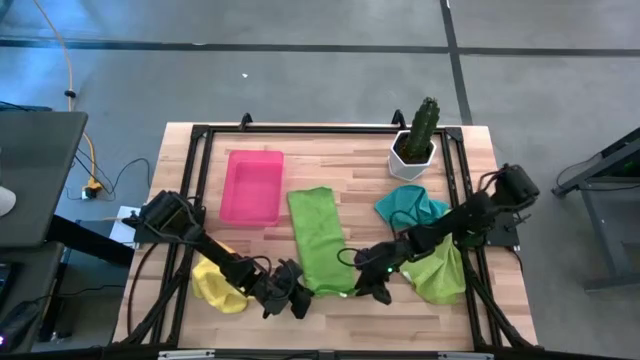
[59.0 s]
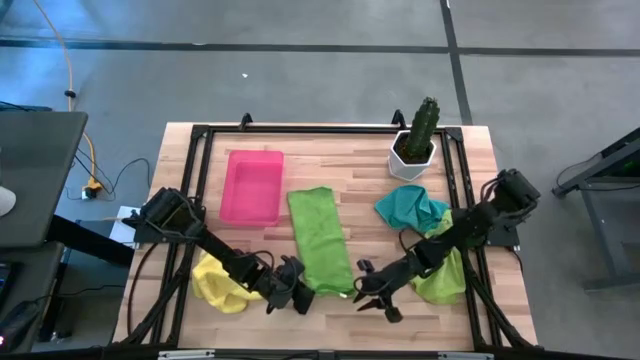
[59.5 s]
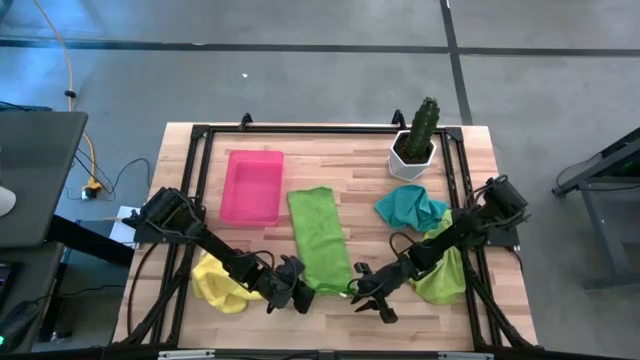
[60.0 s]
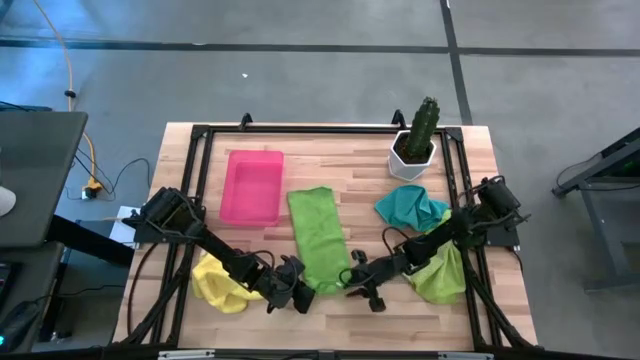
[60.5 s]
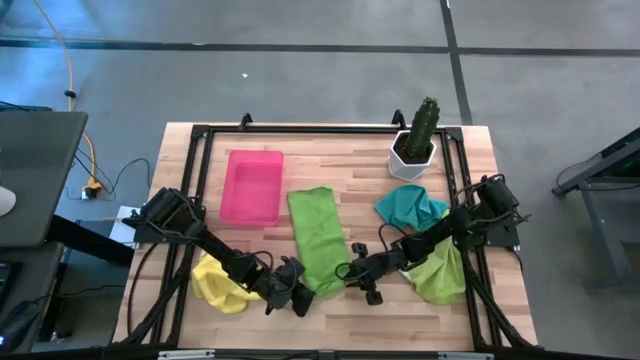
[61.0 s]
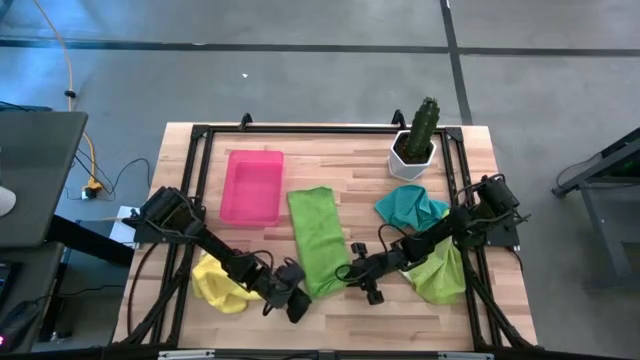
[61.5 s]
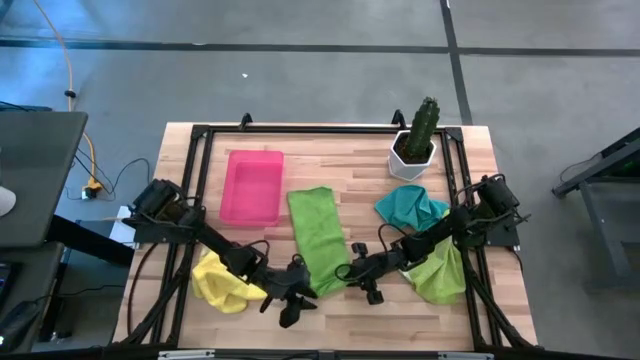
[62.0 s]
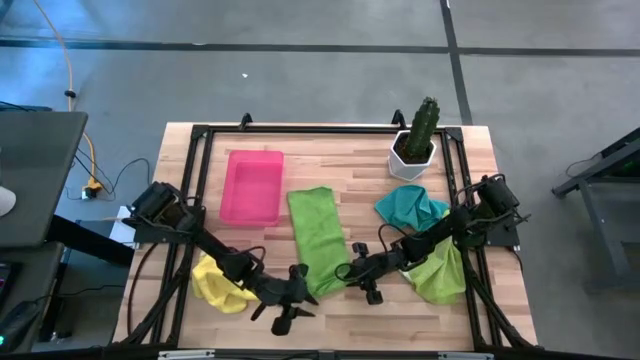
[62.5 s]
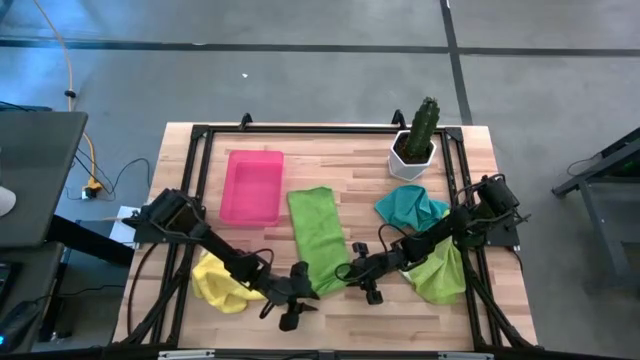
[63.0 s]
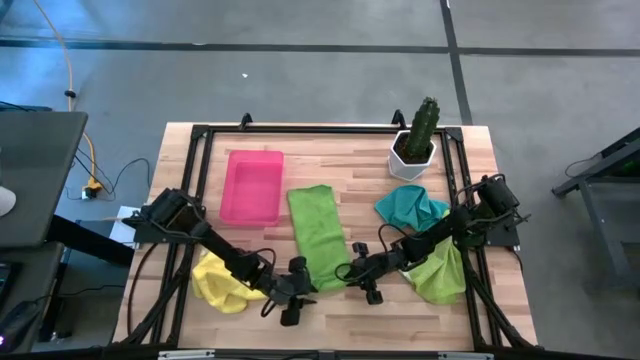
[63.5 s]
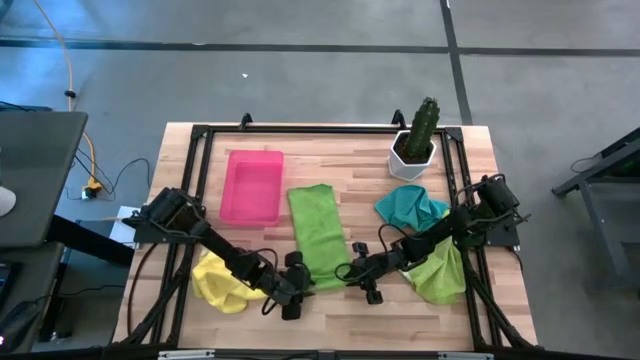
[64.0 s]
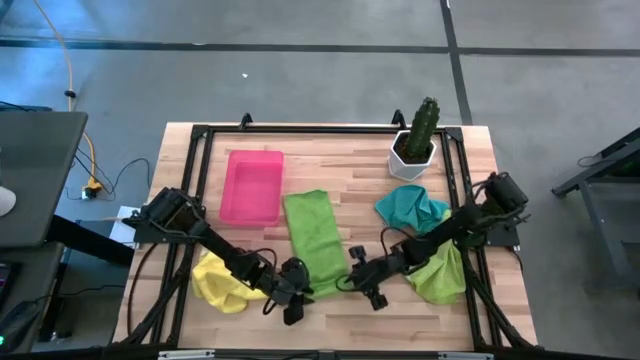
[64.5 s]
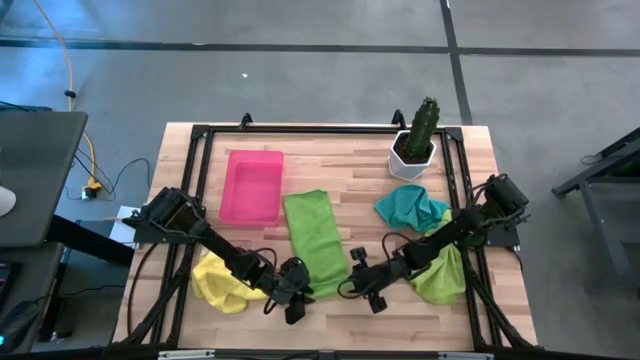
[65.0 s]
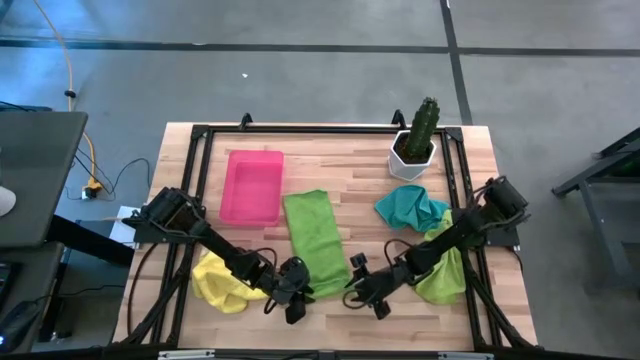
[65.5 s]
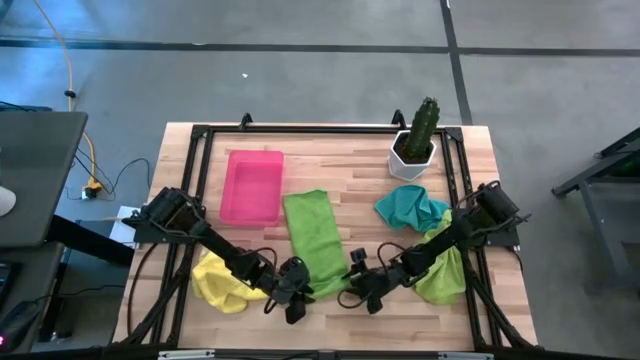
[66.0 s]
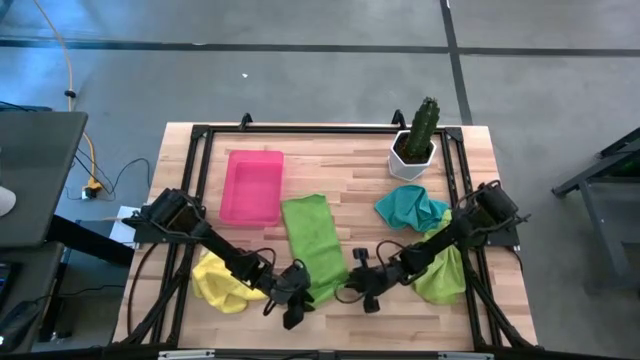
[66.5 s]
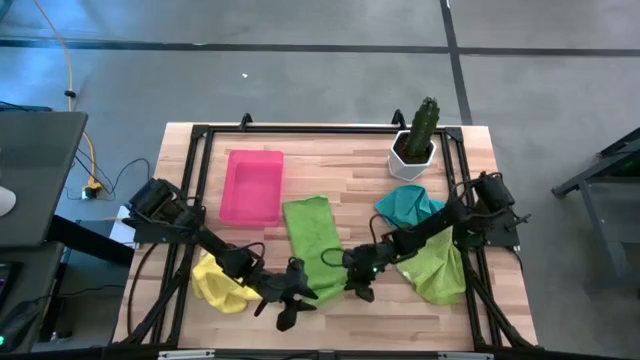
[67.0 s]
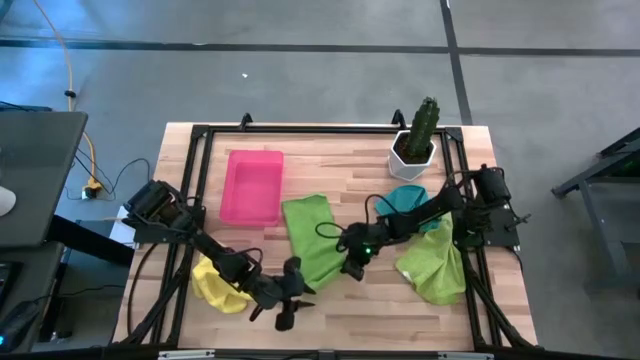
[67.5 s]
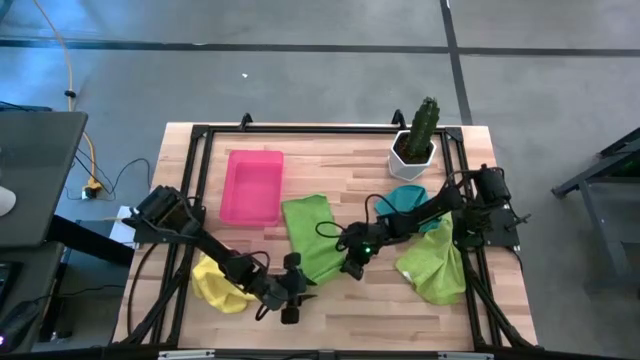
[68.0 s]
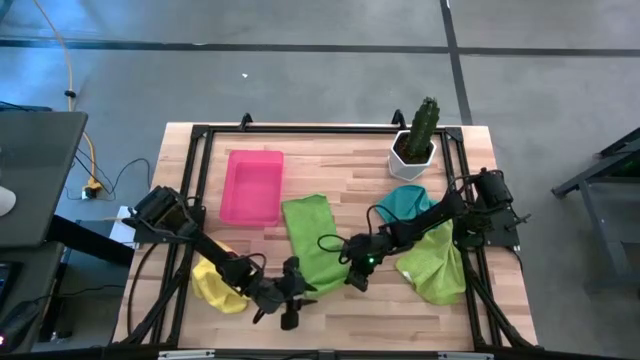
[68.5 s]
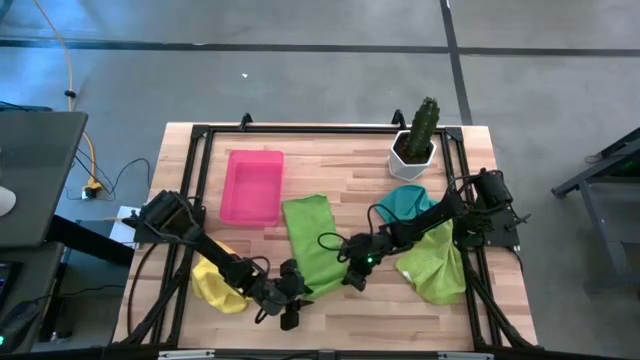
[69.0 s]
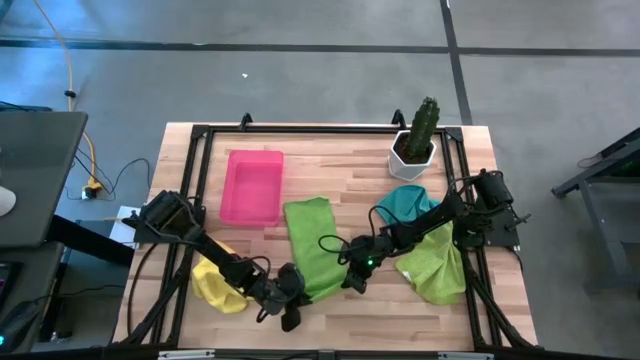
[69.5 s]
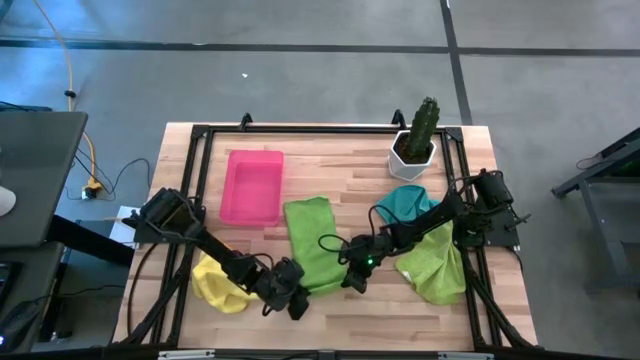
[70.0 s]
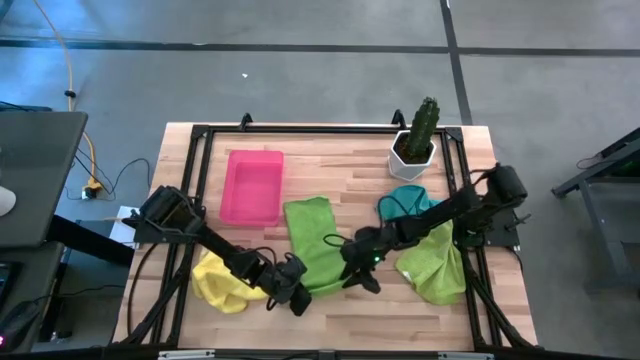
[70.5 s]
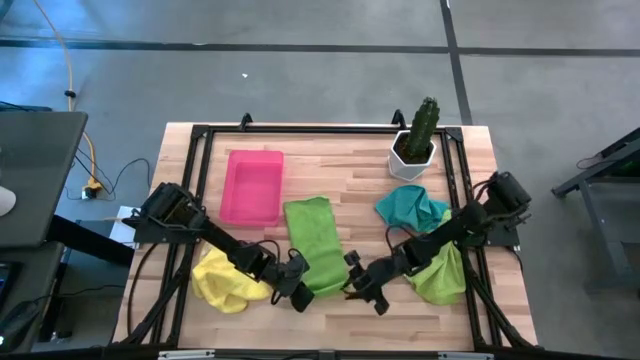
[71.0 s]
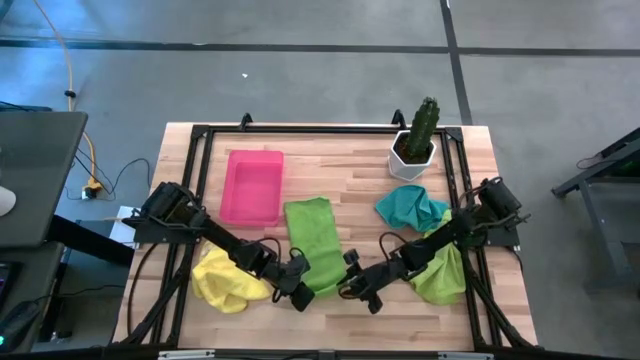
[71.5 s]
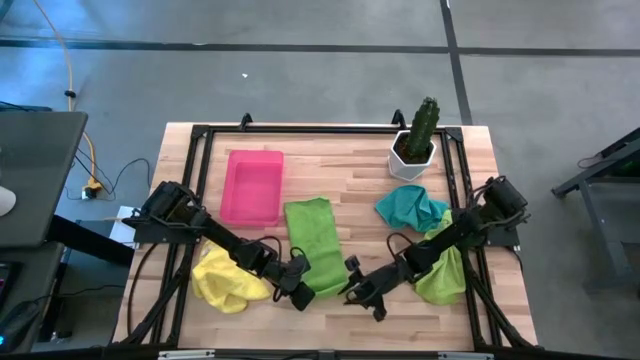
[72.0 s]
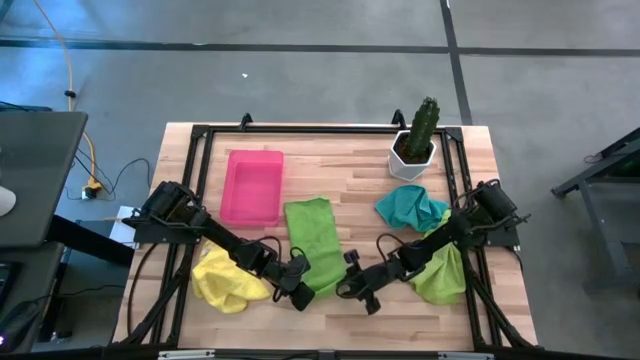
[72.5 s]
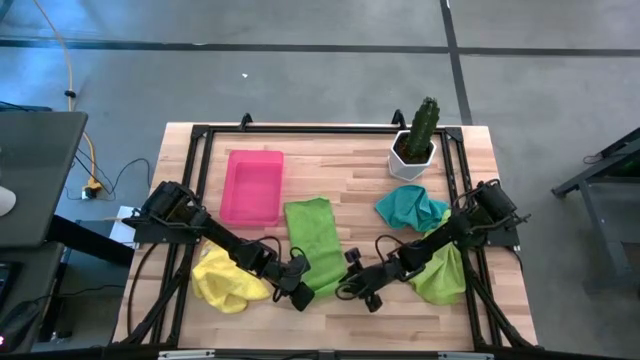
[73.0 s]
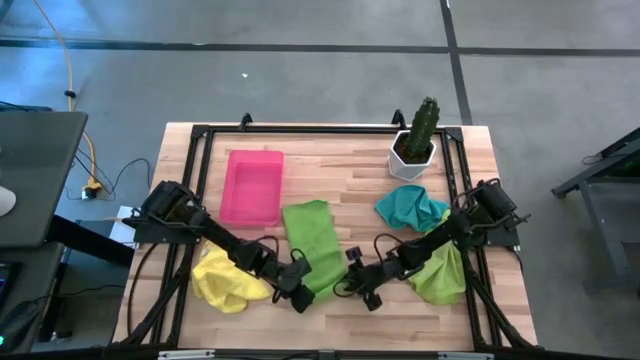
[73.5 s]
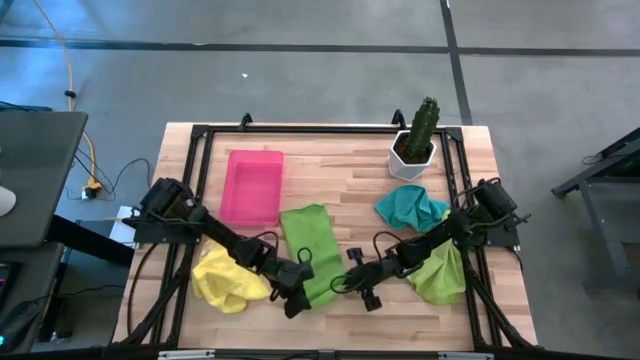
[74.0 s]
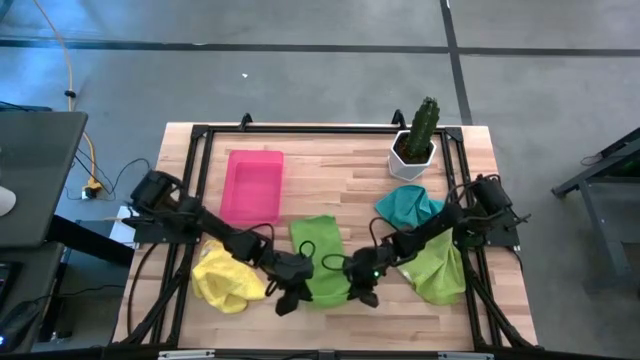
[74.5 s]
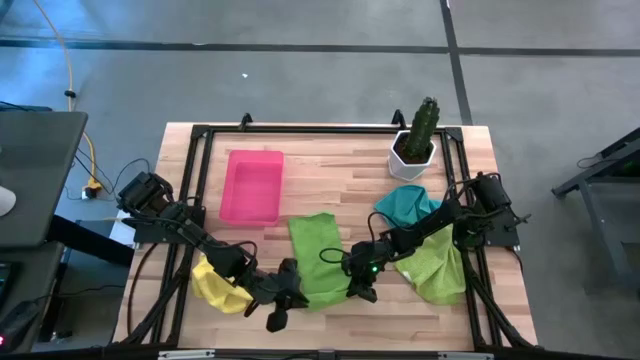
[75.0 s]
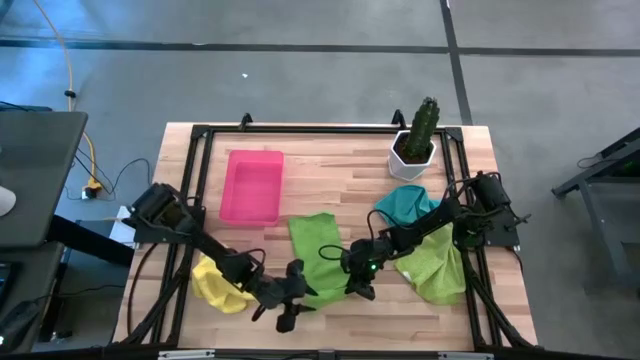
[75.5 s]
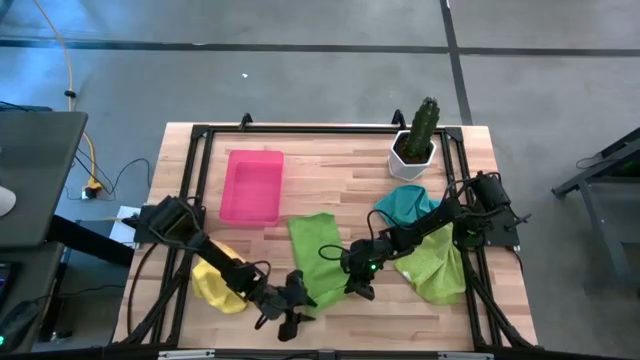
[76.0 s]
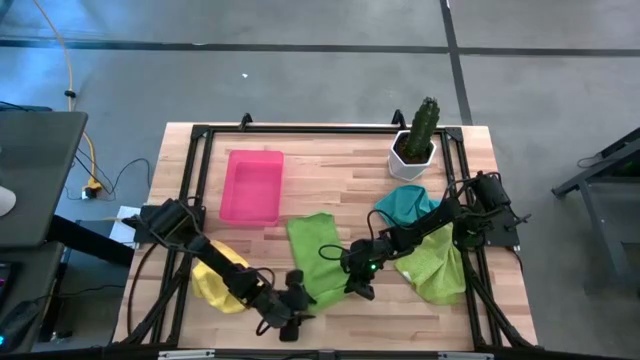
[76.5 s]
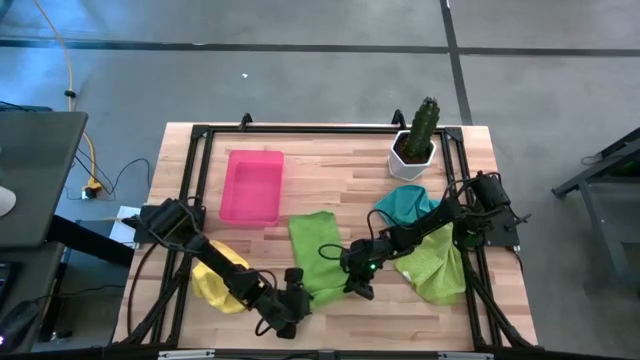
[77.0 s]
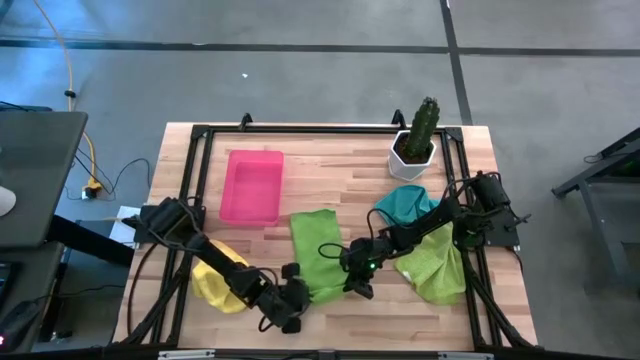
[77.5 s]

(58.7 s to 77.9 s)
Task: Roll microfiber towels into tight, uniform cylinder then place into a basket
Roll the green microfiber cloth
